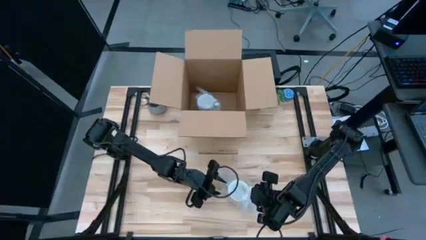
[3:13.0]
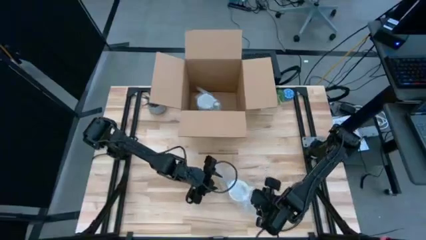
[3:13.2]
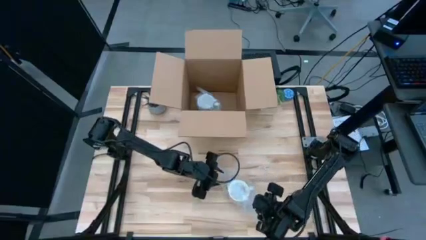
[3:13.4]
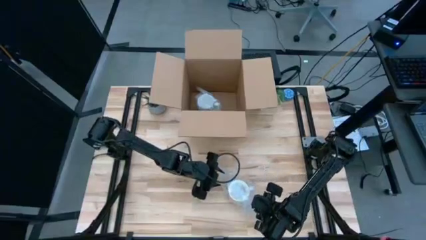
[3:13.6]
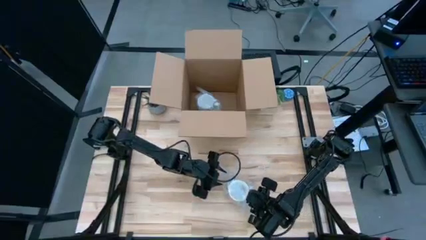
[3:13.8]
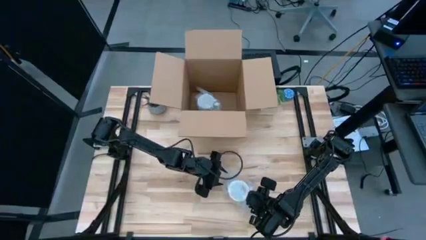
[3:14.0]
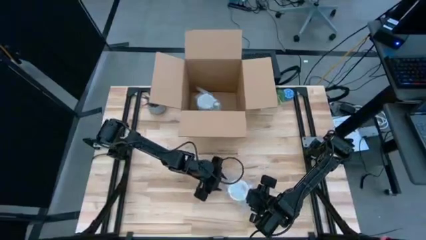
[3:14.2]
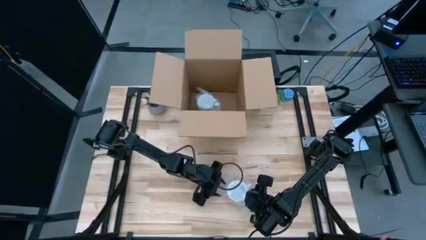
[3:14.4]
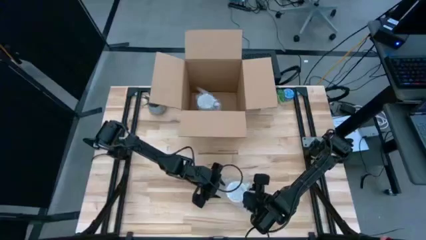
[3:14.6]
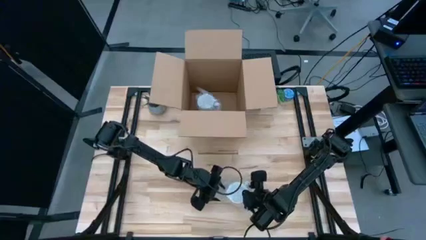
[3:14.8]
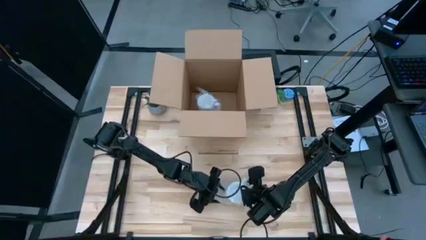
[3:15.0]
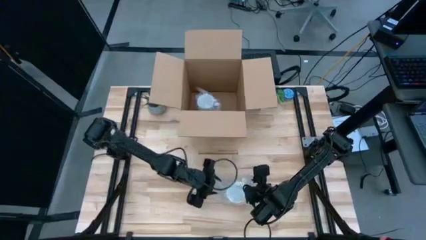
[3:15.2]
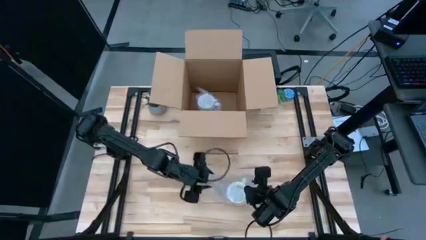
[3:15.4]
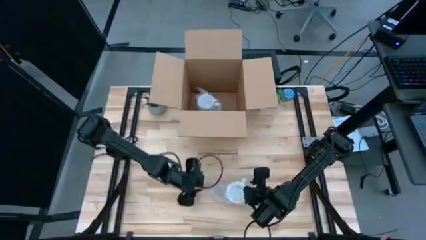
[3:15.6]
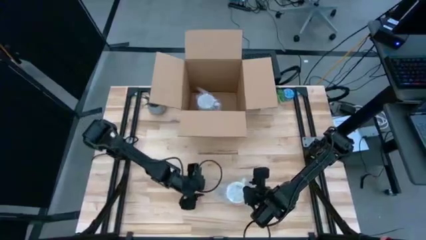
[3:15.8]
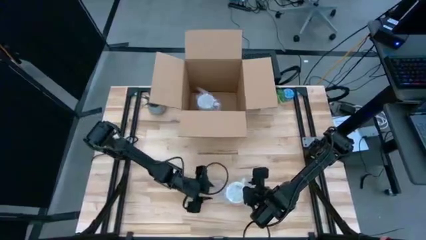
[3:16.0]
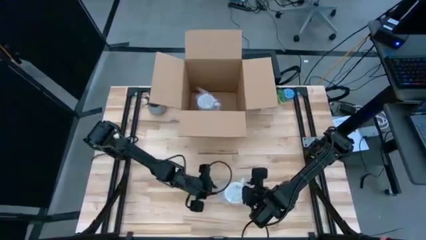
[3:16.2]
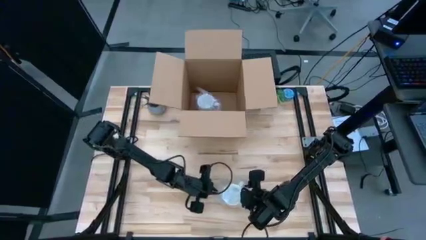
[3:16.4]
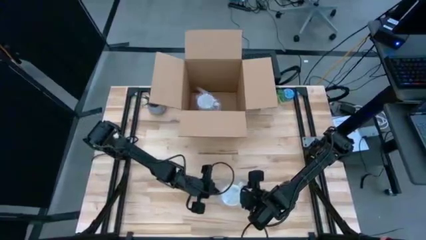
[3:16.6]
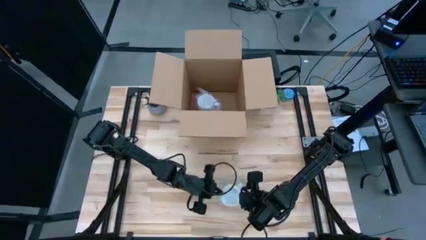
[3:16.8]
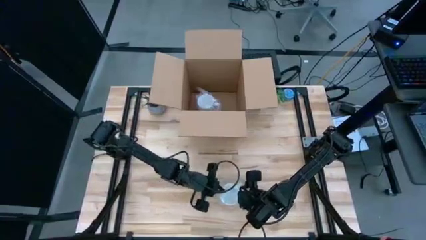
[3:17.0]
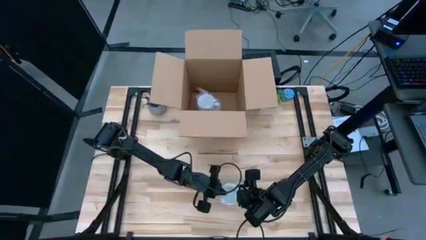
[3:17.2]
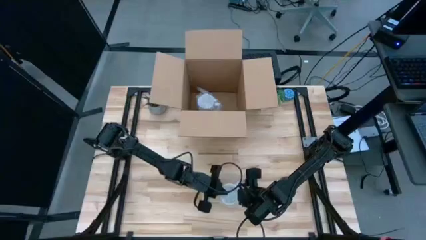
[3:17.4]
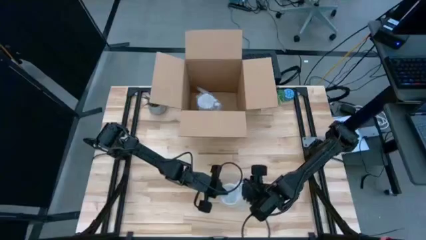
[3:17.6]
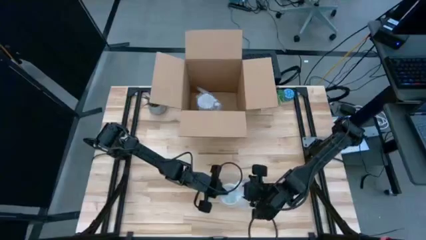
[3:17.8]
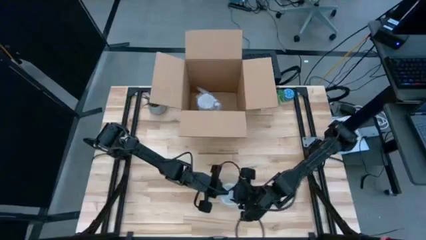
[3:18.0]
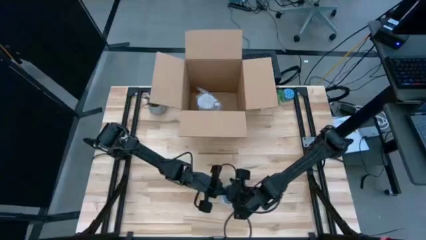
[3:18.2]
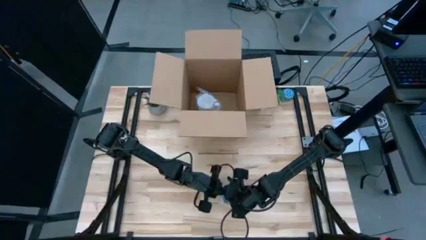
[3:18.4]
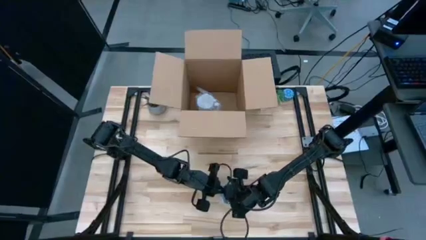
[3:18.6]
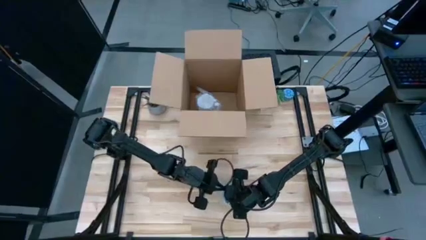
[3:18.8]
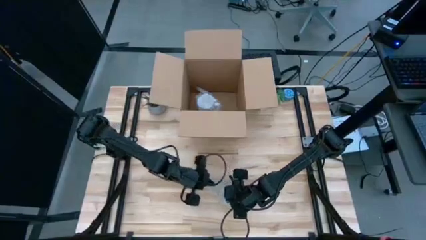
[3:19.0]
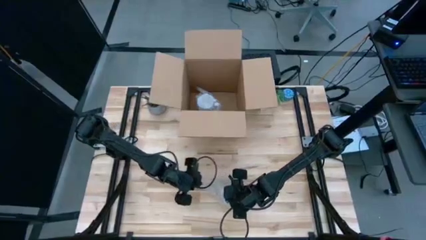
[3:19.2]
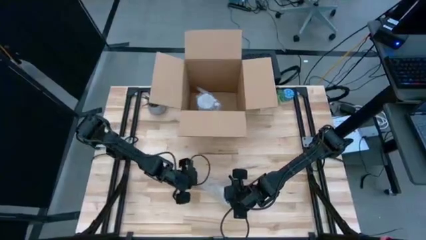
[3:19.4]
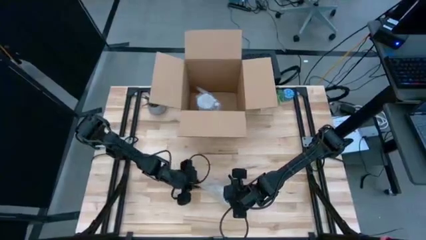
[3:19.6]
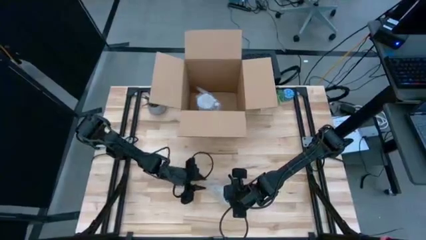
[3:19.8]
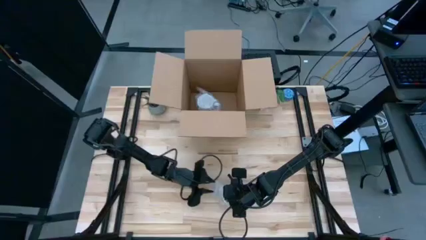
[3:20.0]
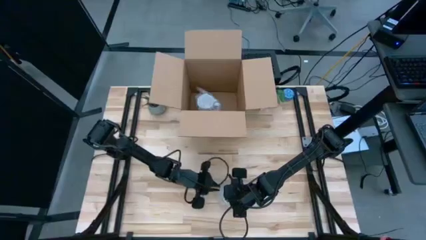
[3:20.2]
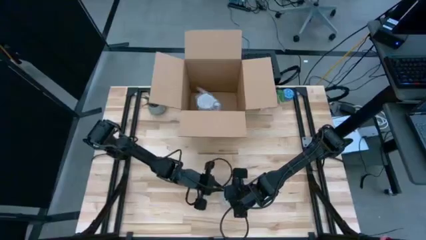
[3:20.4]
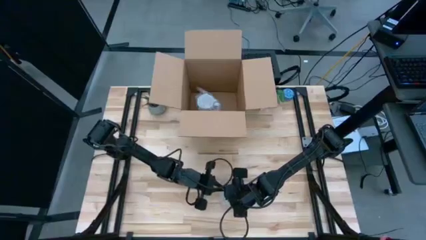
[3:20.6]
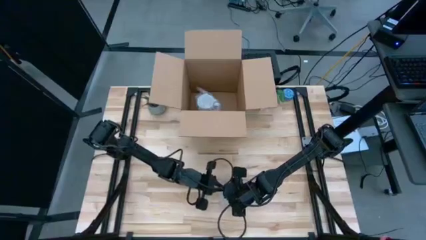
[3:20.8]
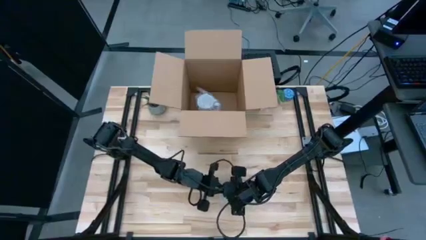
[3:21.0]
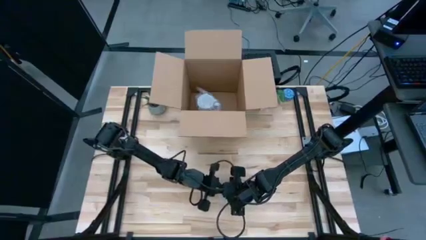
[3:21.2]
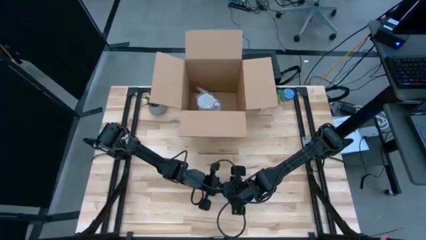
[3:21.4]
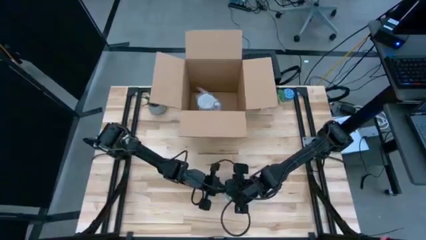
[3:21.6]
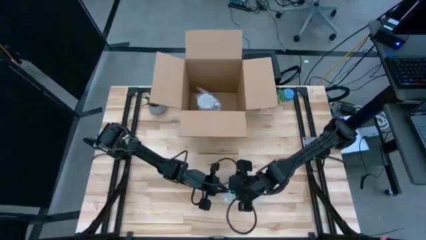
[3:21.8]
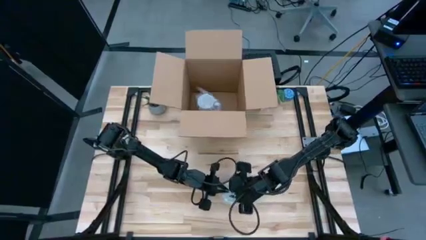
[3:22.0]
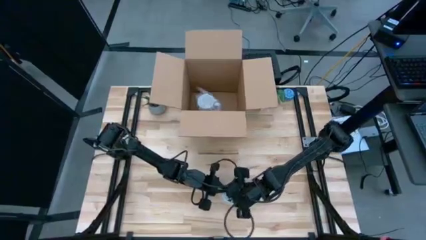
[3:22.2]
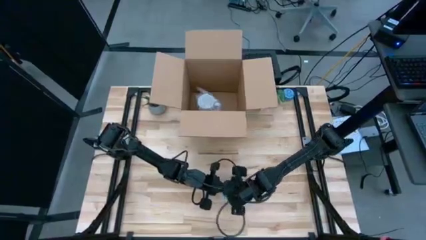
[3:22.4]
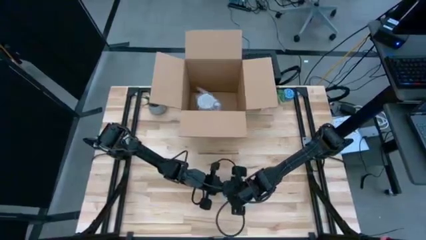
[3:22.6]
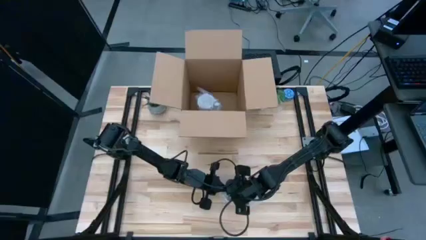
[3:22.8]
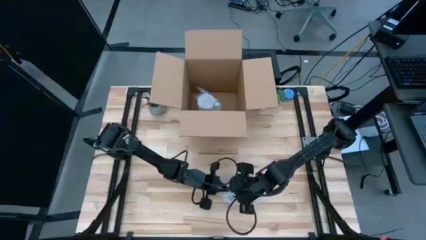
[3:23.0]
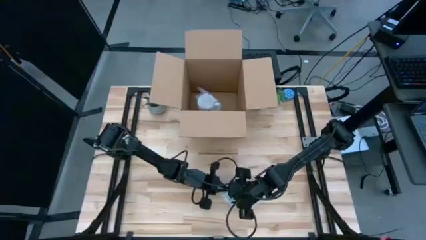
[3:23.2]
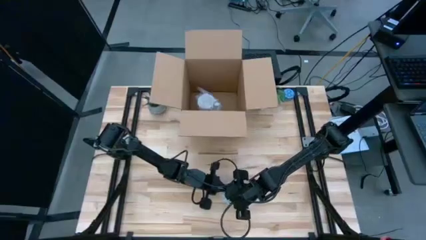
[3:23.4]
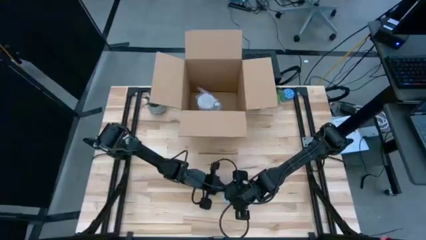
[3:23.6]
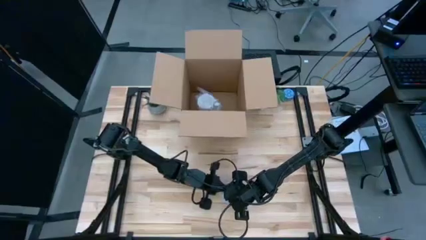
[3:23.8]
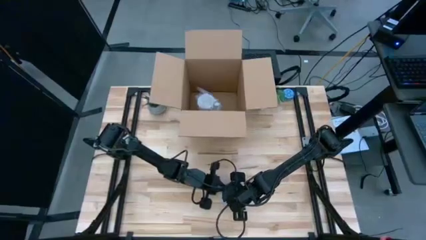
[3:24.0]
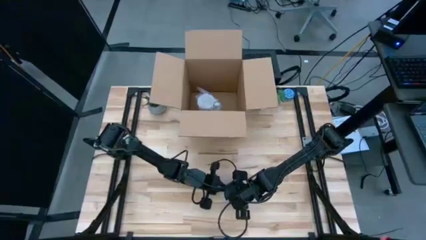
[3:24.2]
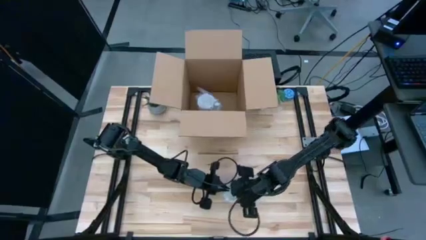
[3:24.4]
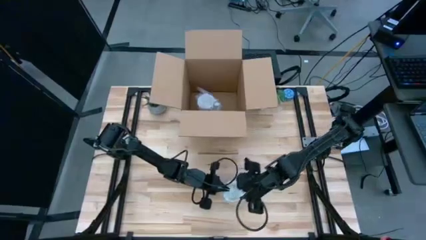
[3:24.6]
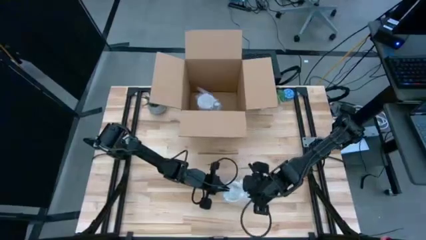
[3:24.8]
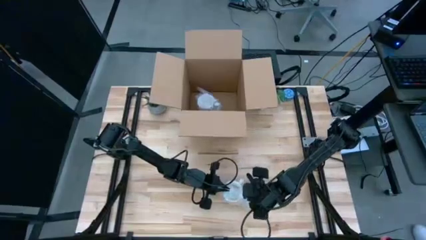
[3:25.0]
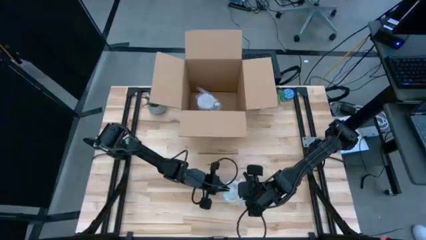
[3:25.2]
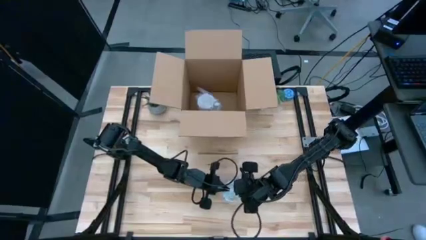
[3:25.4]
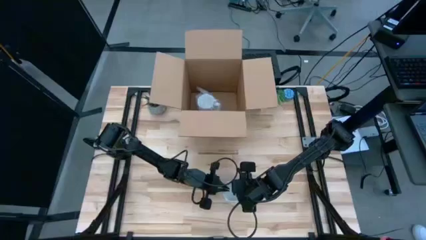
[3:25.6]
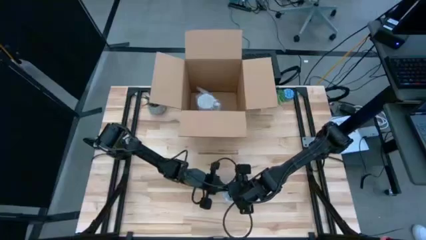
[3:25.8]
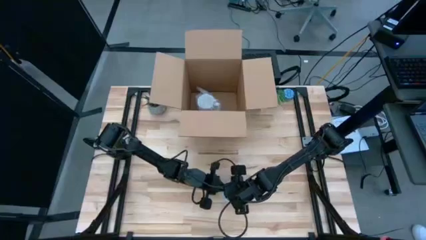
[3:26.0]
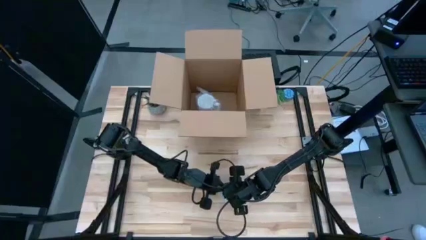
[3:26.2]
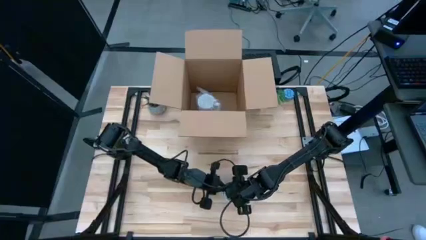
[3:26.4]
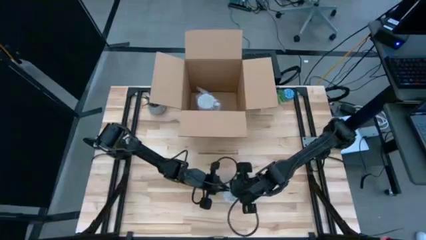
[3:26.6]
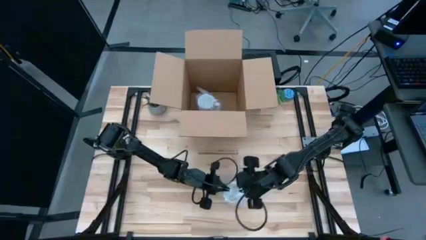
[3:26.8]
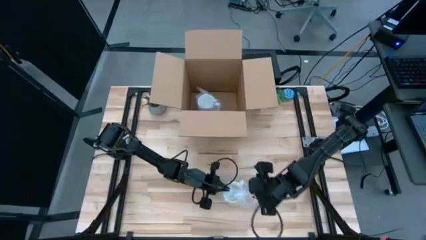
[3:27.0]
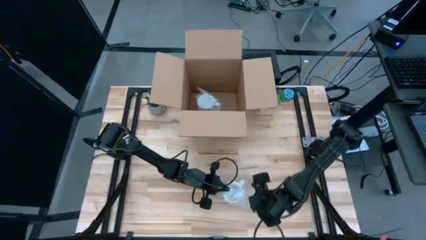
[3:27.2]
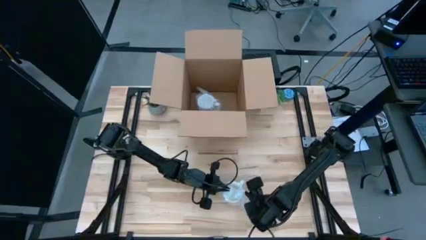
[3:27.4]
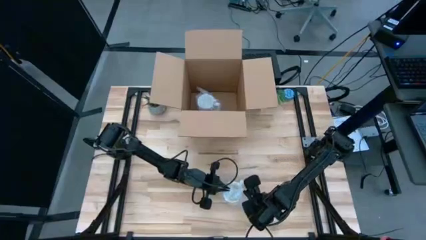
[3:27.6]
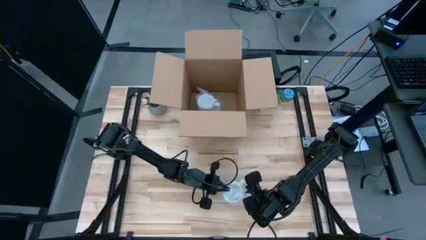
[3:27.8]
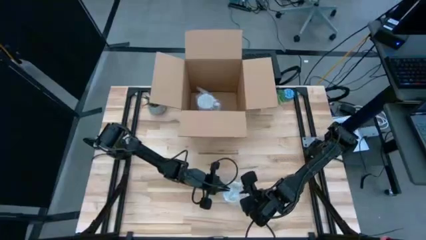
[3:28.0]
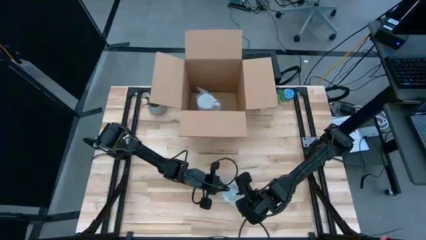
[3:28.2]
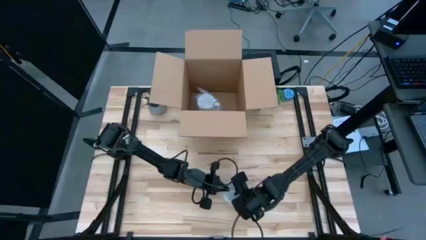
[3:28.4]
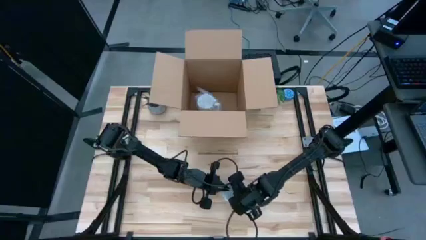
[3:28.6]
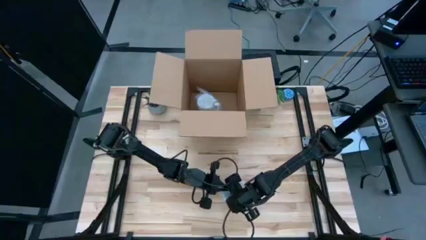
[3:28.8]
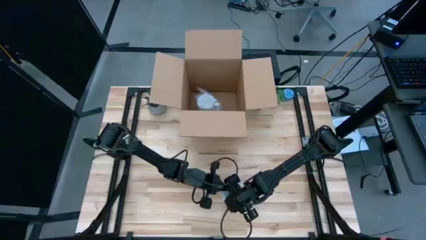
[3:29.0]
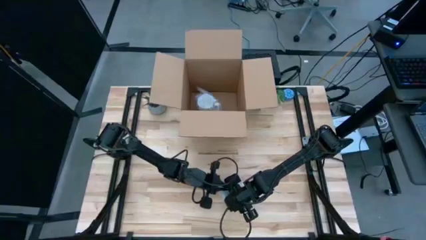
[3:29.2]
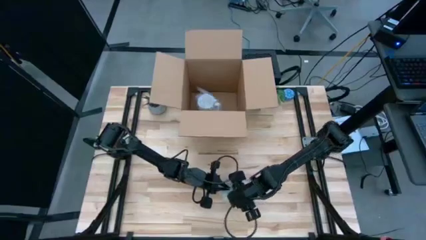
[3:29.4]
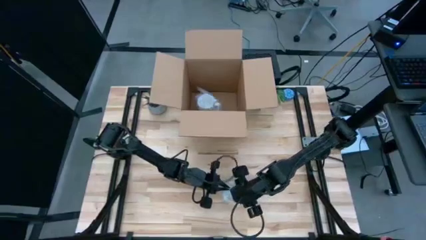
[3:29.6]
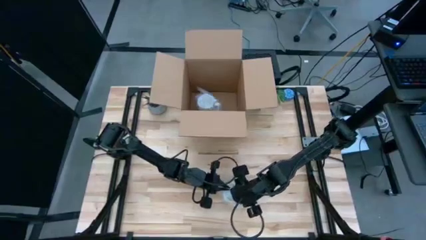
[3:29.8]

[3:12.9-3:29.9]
Task: wrap mug
Wrap the orange mug with bubble wrap
